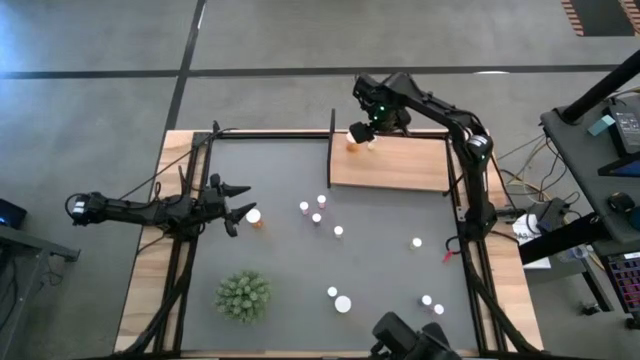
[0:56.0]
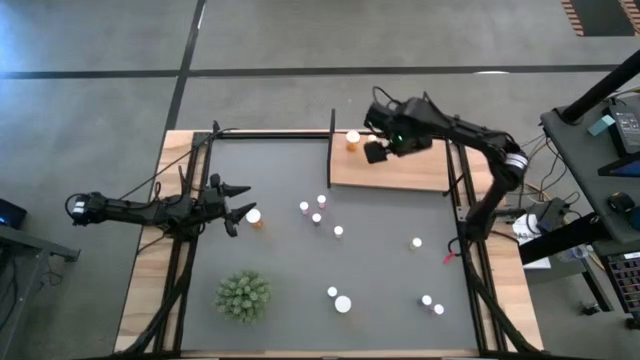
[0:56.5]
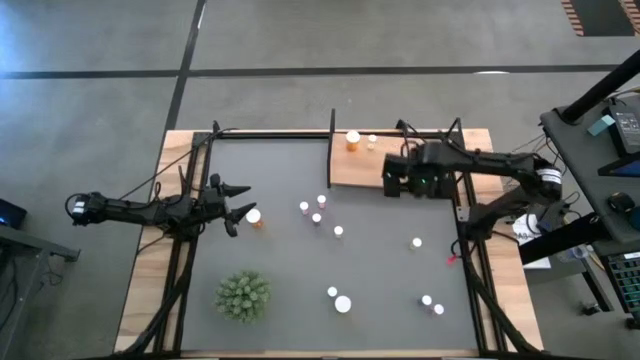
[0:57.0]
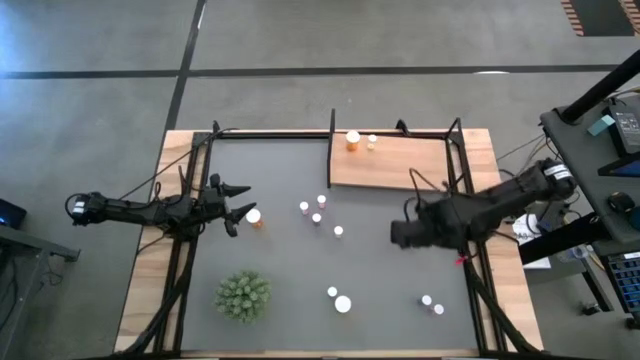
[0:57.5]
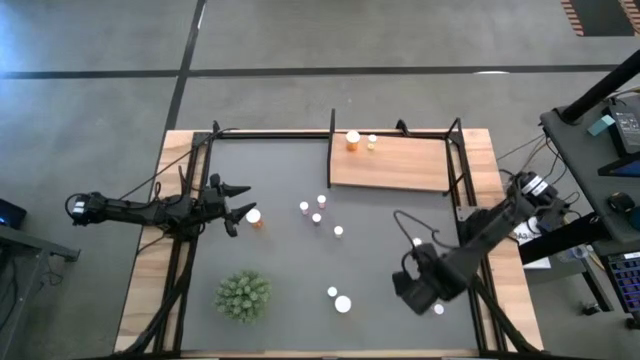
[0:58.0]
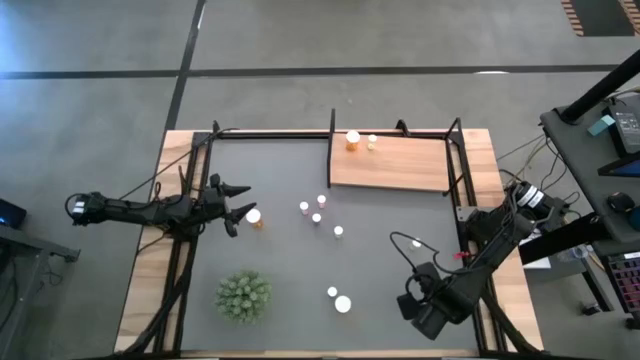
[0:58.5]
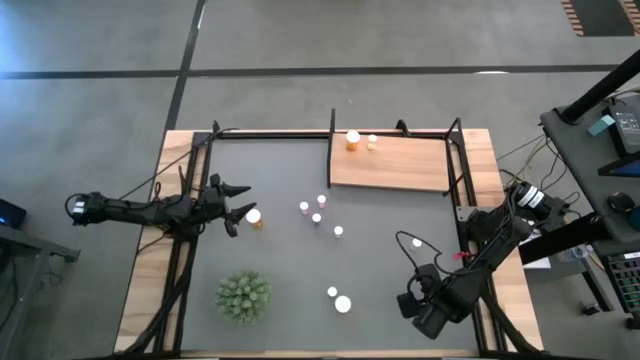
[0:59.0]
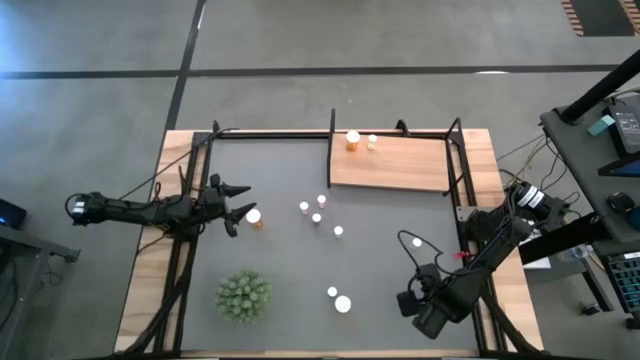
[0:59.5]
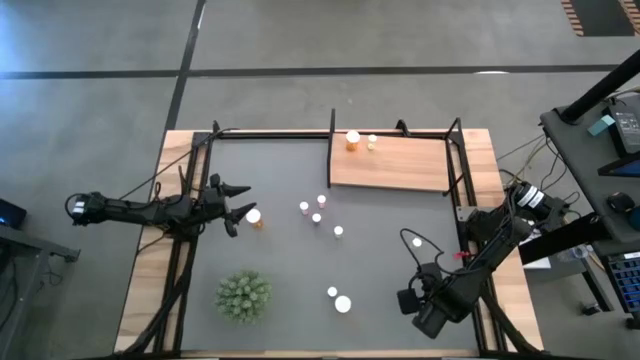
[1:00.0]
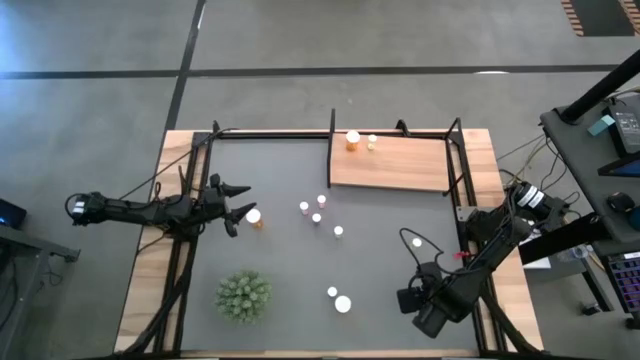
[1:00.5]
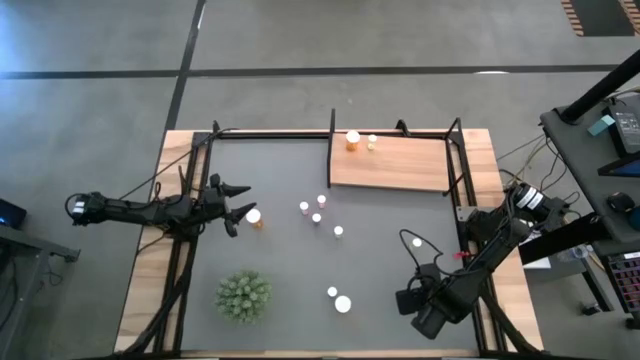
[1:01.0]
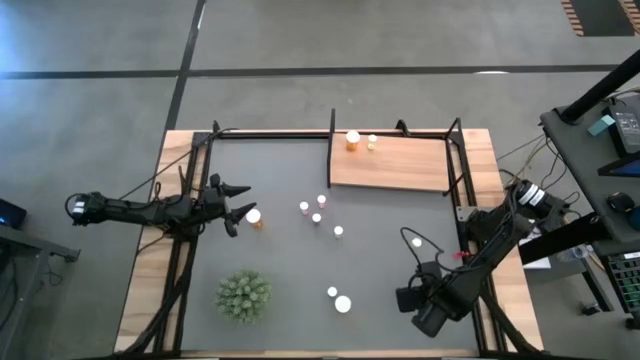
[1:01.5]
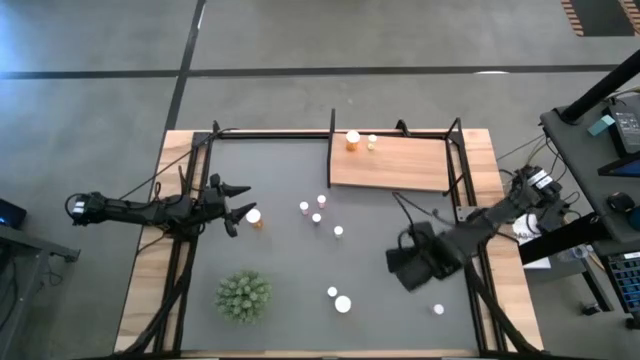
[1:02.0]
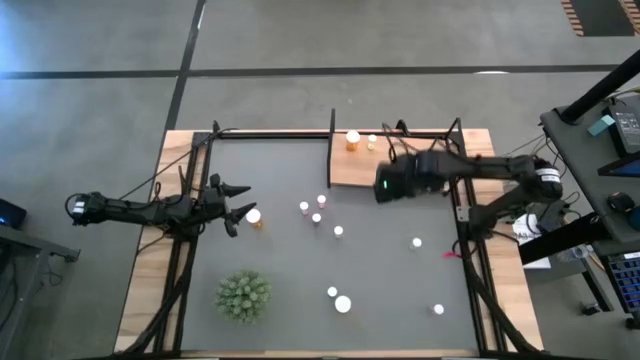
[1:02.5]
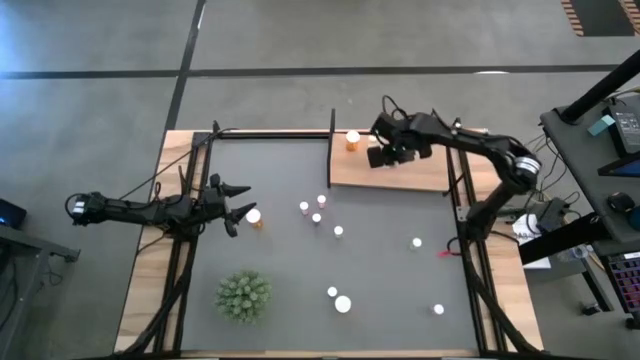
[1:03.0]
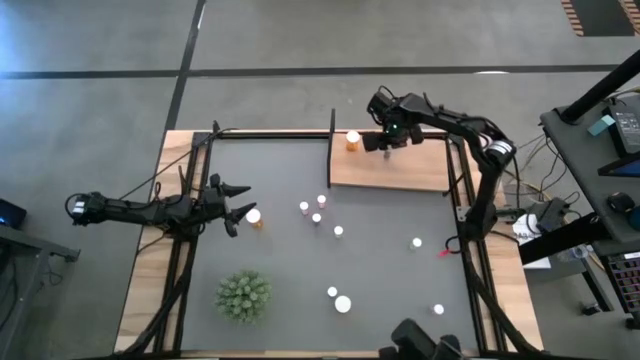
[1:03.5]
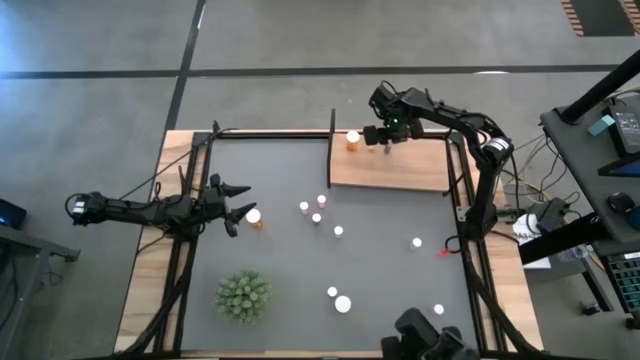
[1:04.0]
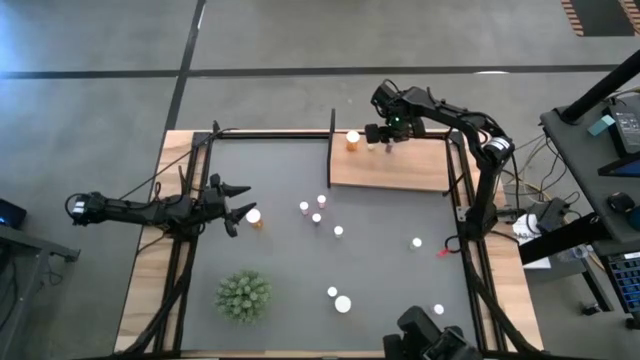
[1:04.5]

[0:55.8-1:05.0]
Task: Pick and place medicine bottles onto shelf by color
Put the right blue pill bottle on the shelf

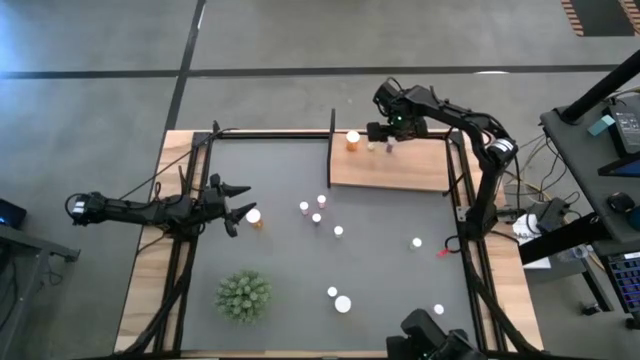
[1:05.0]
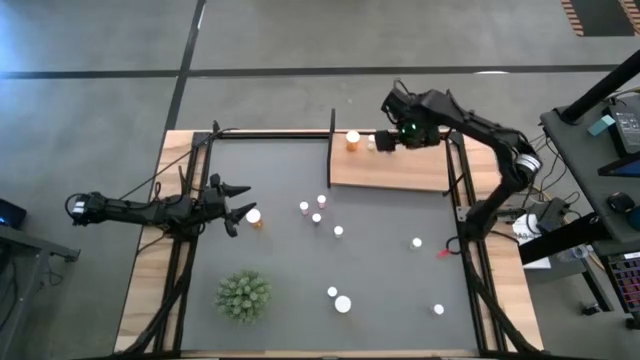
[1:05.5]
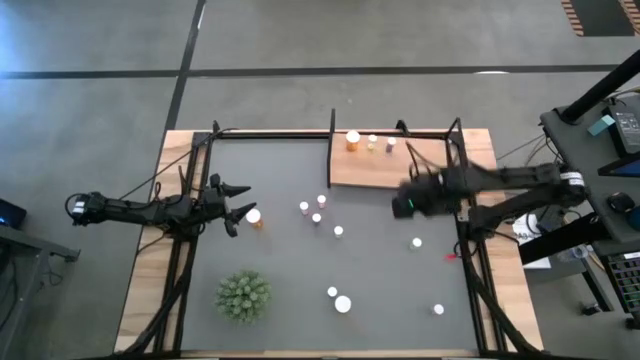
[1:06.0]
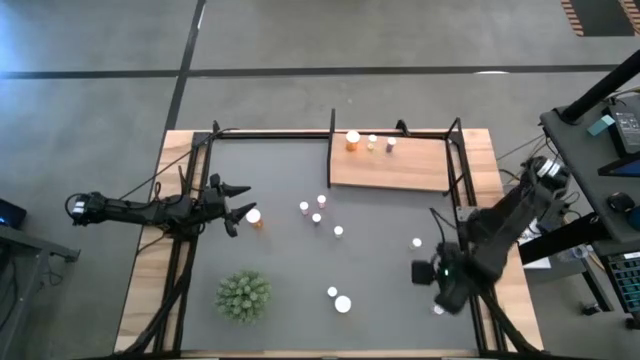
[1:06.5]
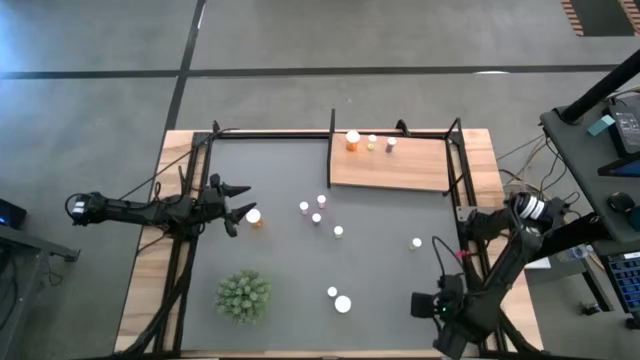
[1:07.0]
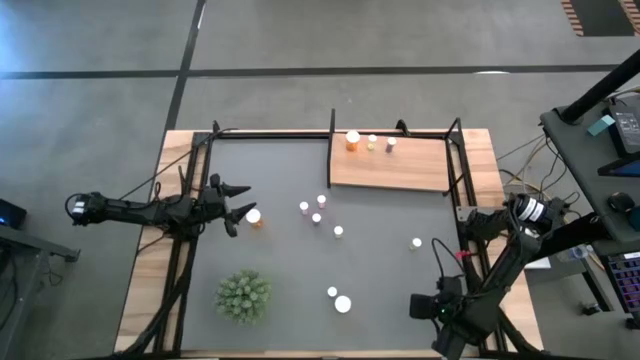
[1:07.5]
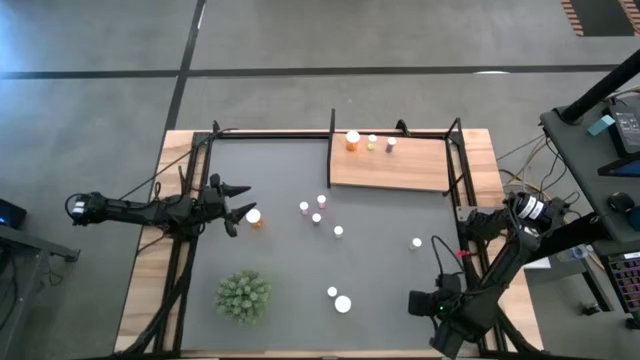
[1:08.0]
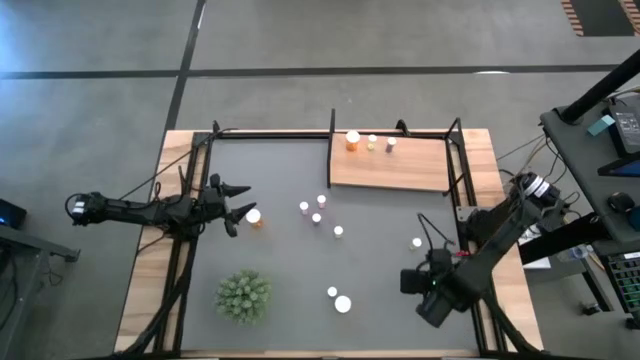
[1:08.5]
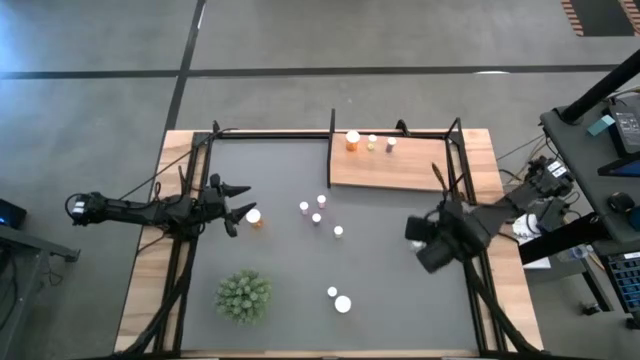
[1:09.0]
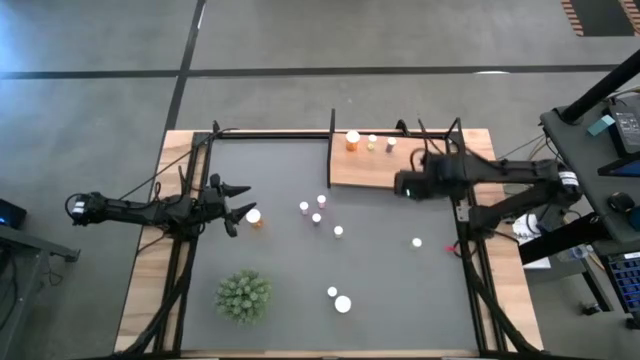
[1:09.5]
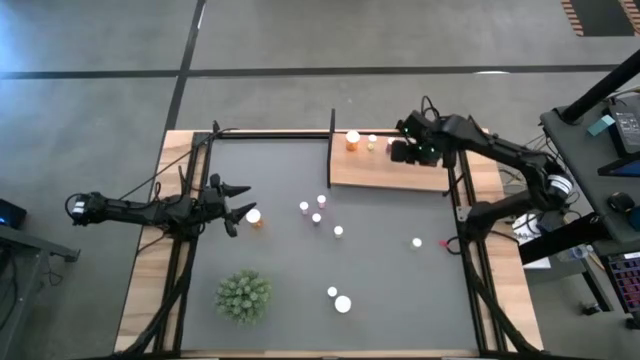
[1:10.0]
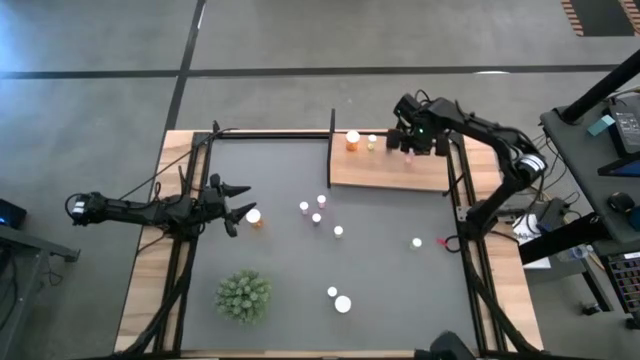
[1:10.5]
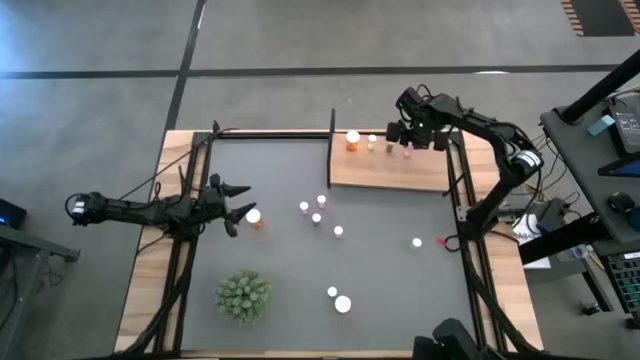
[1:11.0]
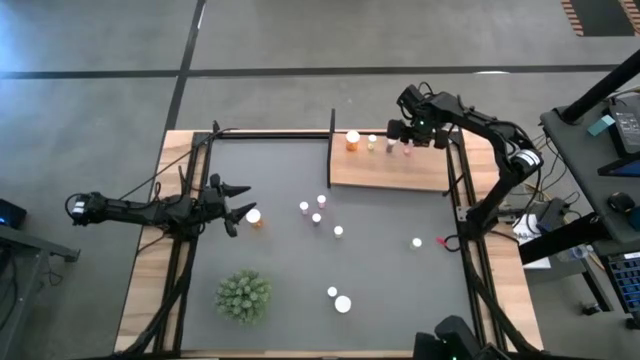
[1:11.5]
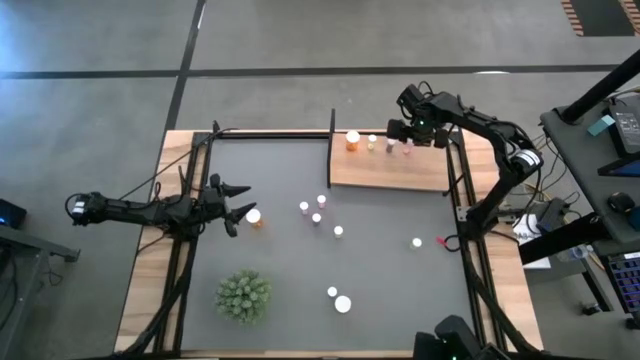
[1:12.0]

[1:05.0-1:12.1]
Put the bottom pink pill bottle on the shelf

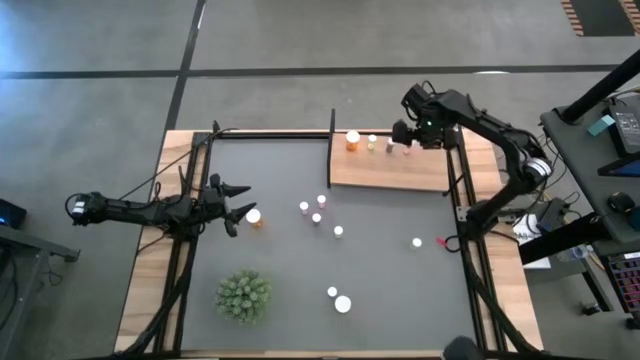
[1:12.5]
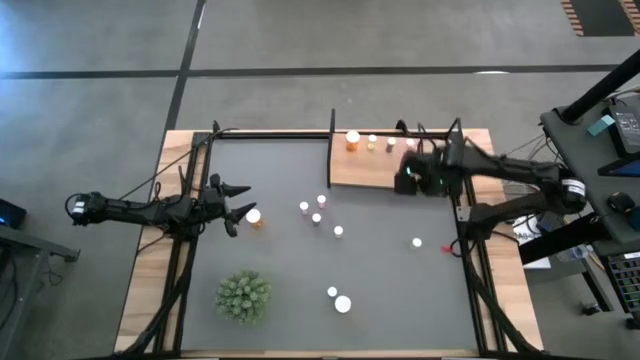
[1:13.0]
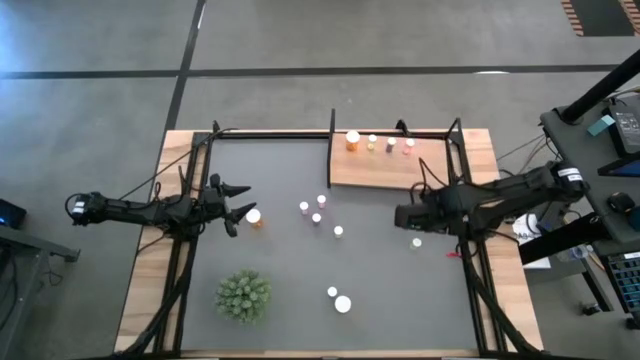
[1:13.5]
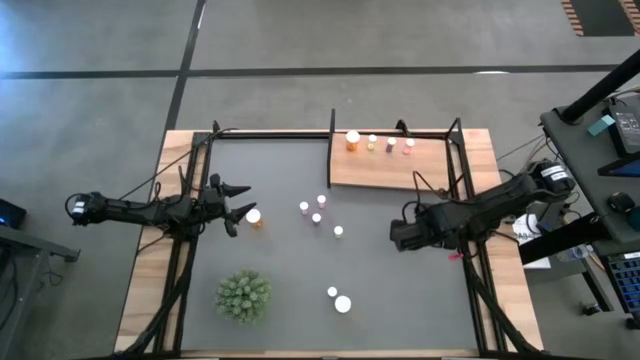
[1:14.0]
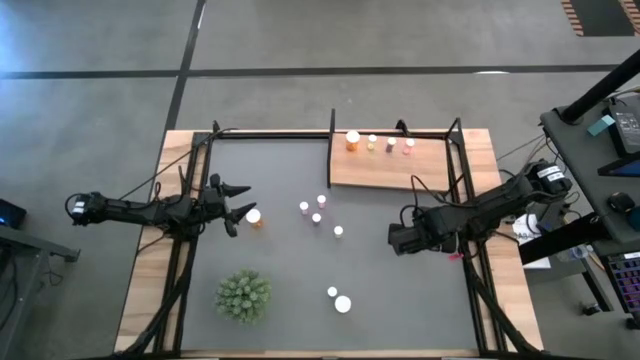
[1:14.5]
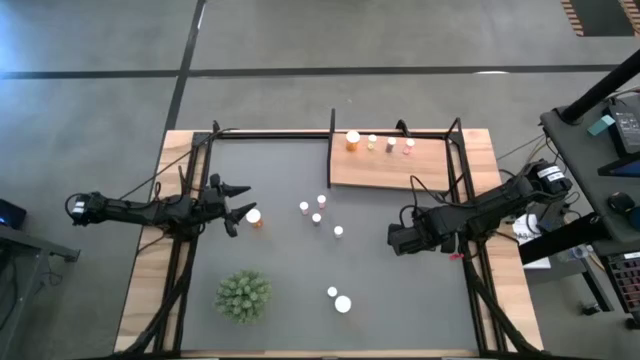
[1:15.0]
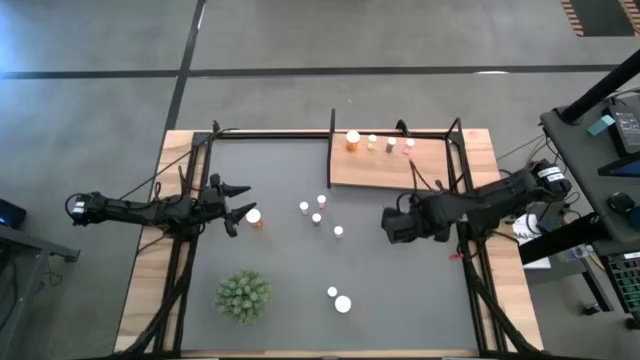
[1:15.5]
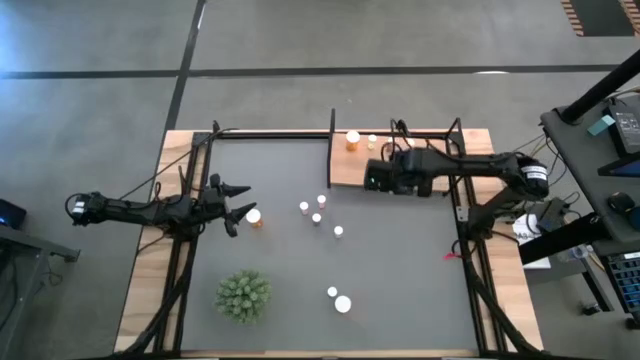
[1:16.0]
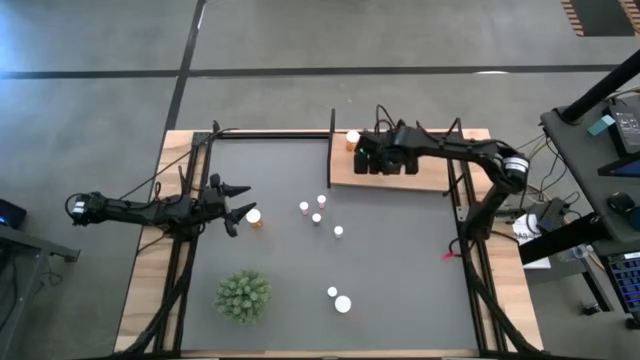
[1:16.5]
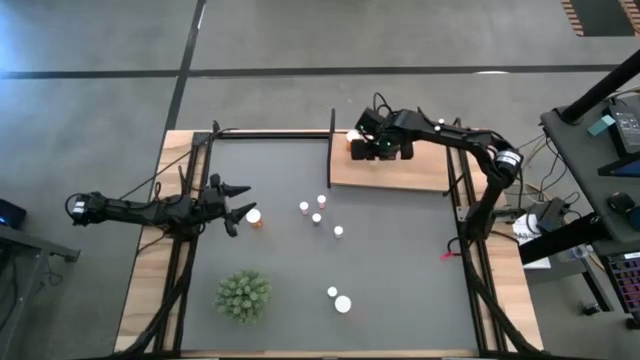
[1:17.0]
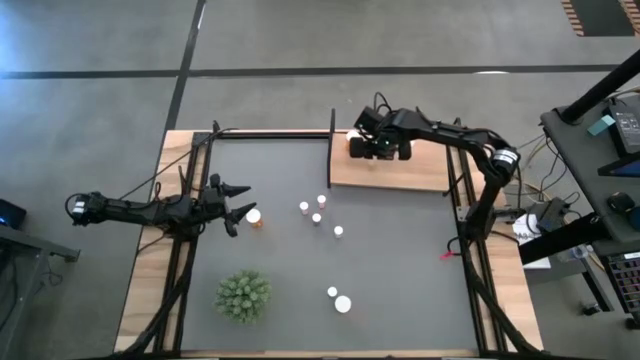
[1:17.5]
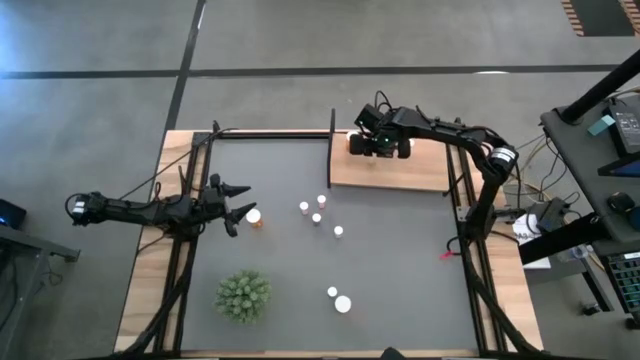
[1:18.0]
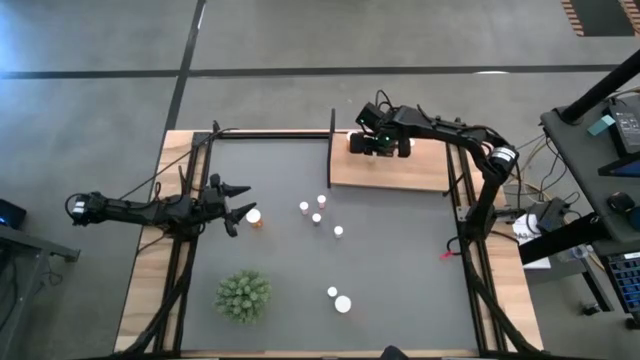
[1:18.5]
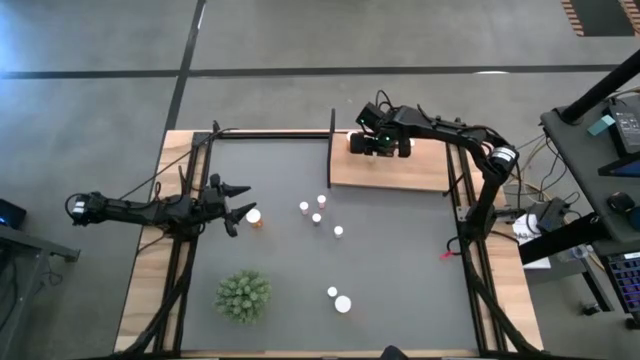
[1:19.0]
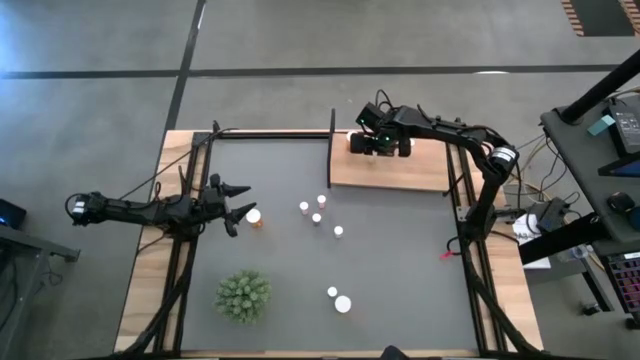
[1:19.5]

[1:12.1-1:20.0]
Put the right yellow pill bottle on the shelf aligned with the other yellow pill bottle
